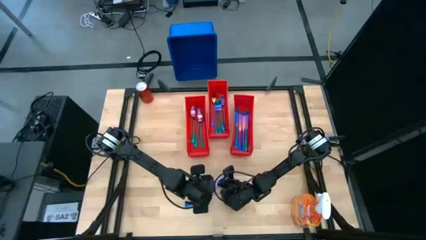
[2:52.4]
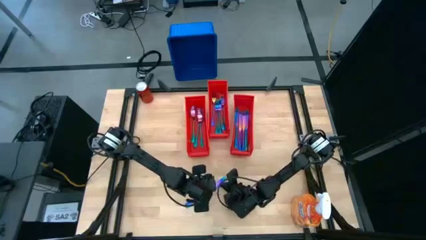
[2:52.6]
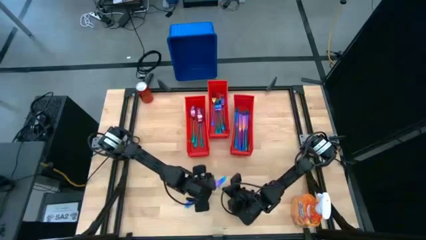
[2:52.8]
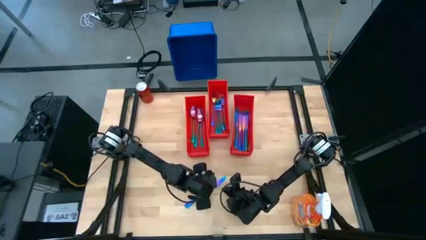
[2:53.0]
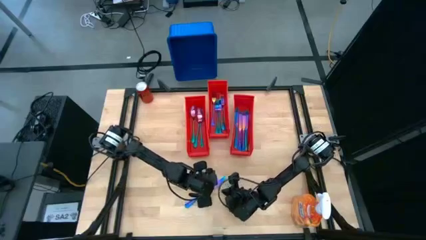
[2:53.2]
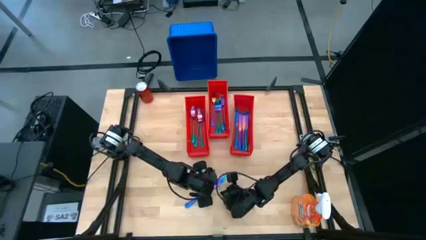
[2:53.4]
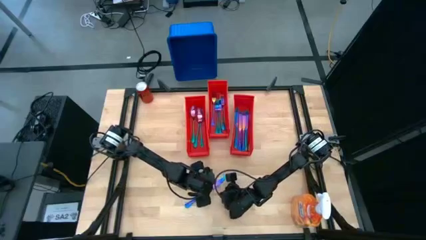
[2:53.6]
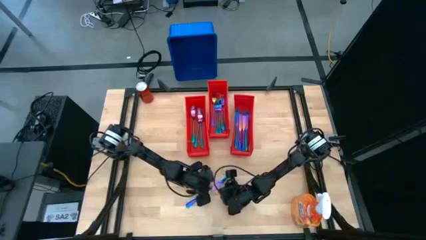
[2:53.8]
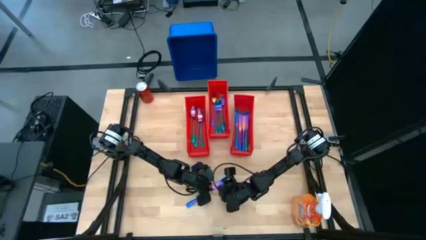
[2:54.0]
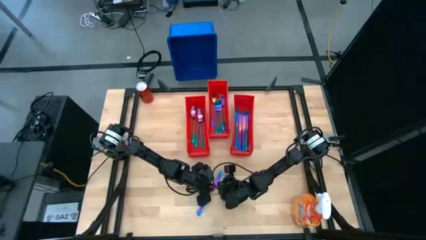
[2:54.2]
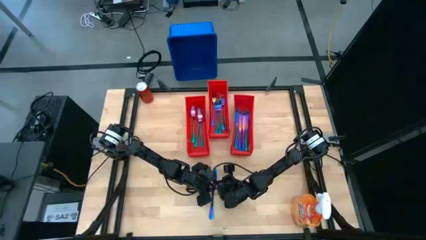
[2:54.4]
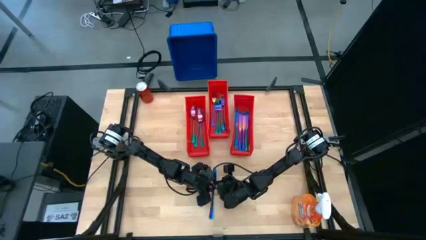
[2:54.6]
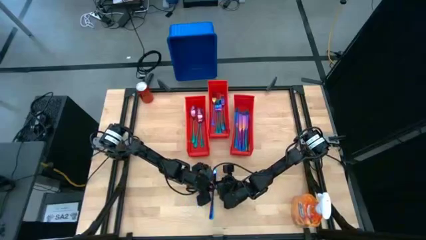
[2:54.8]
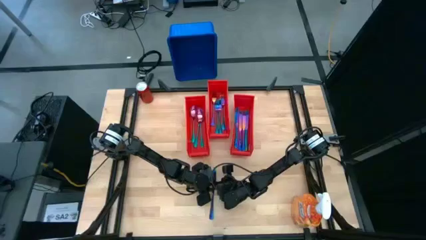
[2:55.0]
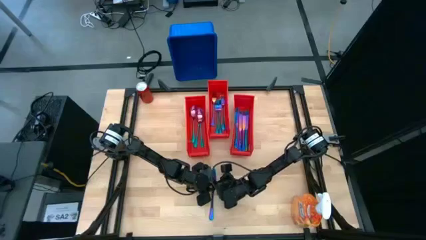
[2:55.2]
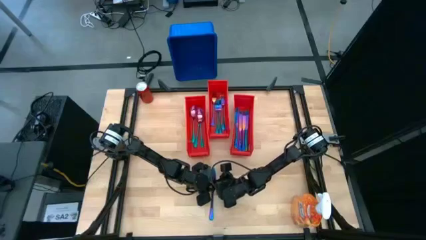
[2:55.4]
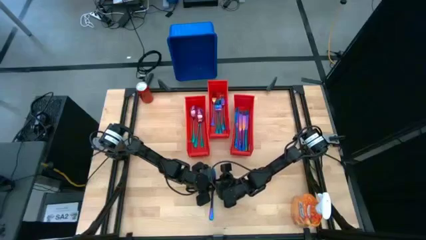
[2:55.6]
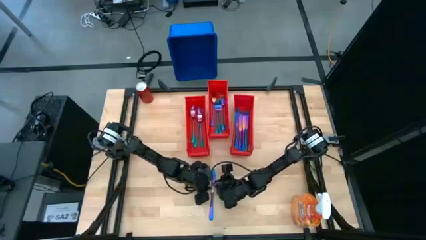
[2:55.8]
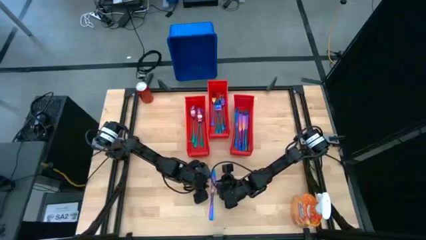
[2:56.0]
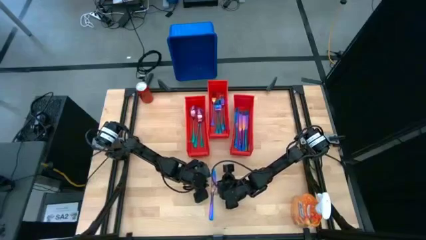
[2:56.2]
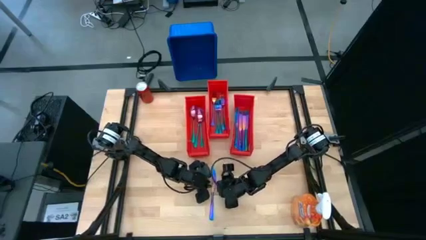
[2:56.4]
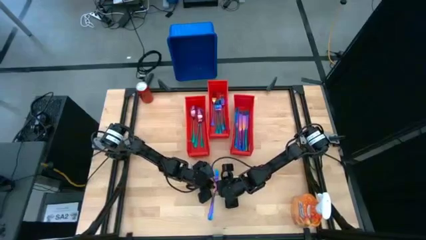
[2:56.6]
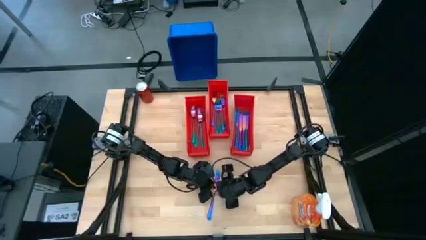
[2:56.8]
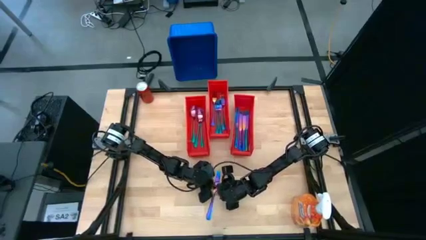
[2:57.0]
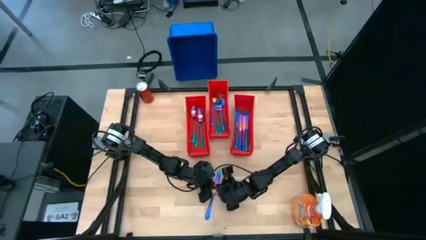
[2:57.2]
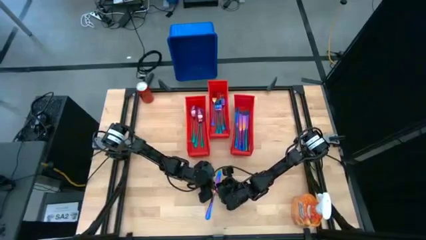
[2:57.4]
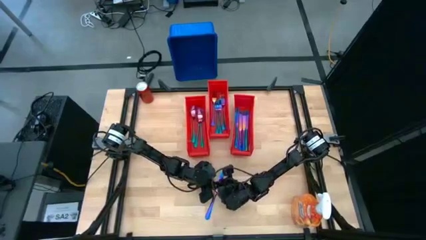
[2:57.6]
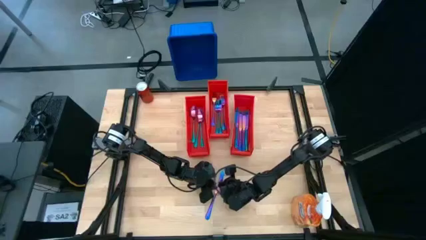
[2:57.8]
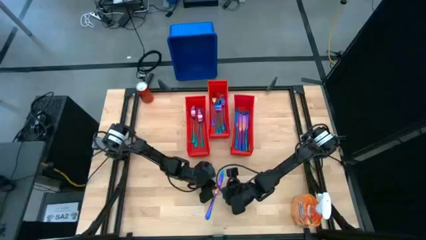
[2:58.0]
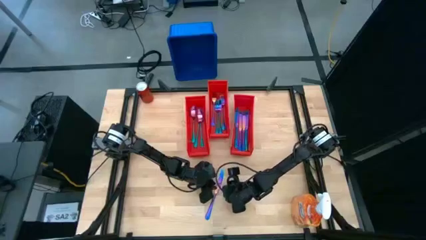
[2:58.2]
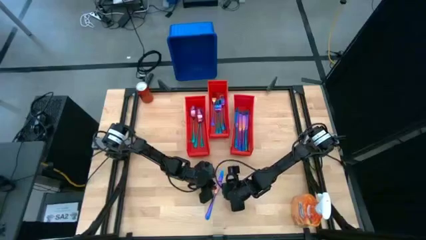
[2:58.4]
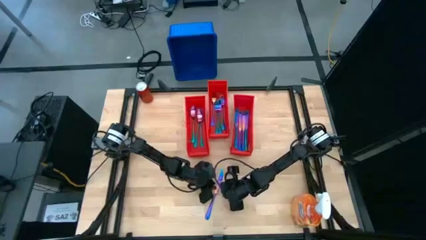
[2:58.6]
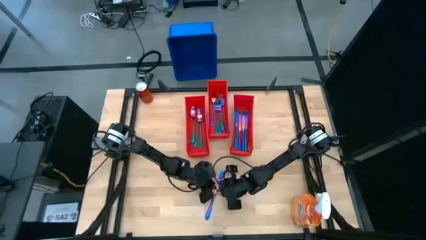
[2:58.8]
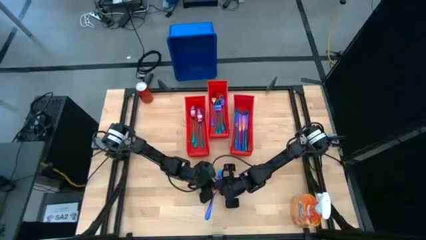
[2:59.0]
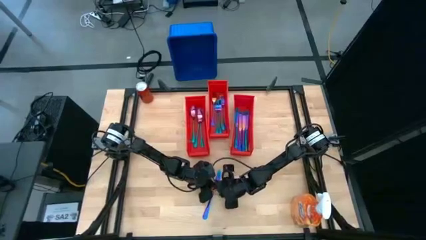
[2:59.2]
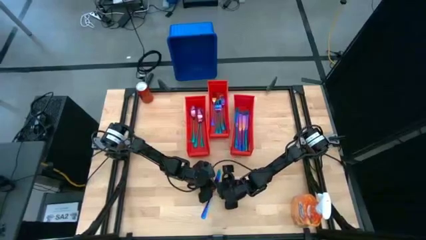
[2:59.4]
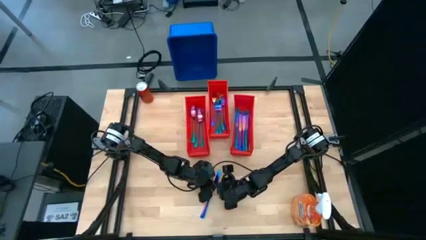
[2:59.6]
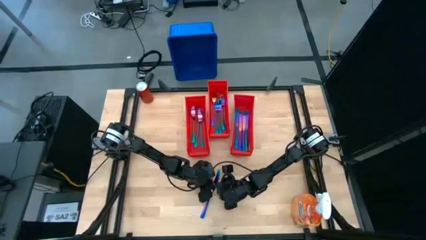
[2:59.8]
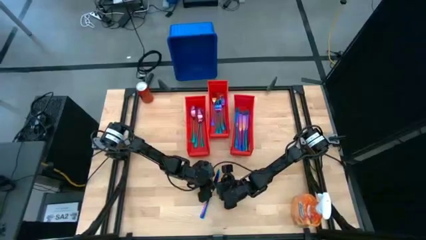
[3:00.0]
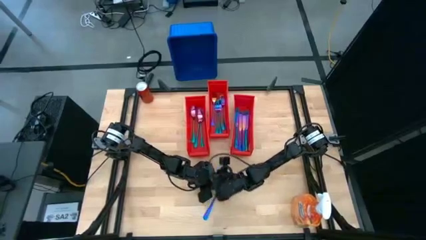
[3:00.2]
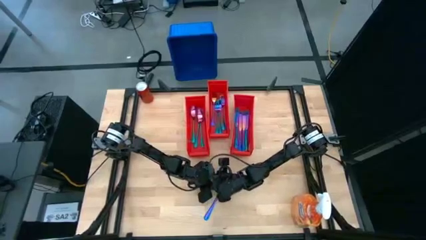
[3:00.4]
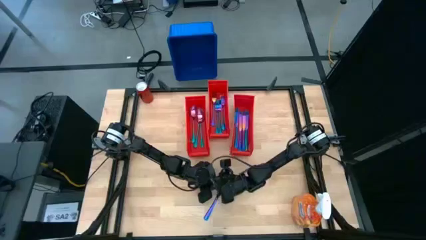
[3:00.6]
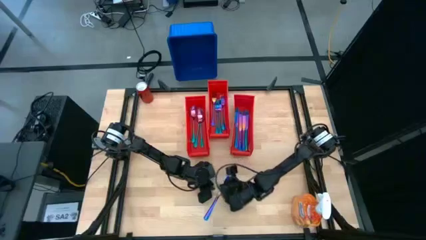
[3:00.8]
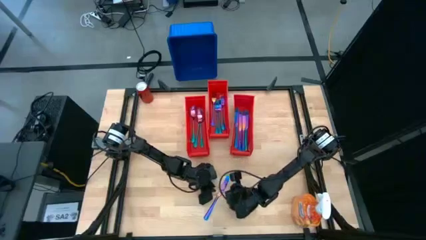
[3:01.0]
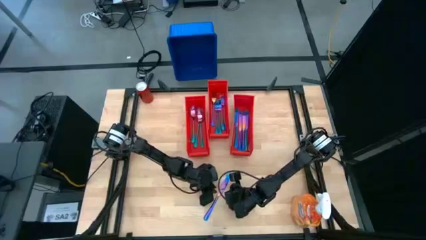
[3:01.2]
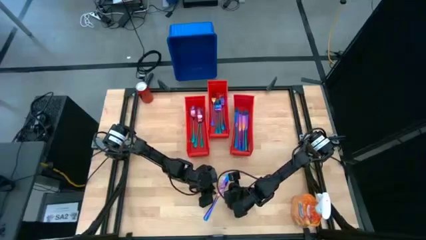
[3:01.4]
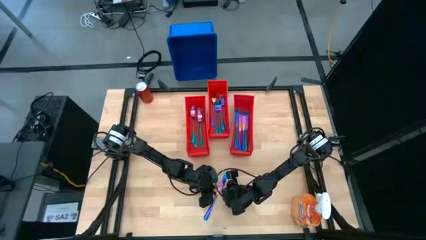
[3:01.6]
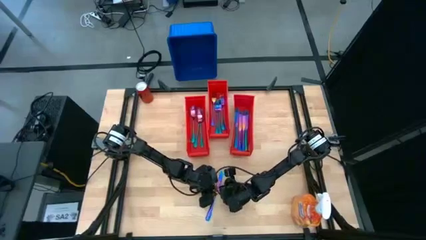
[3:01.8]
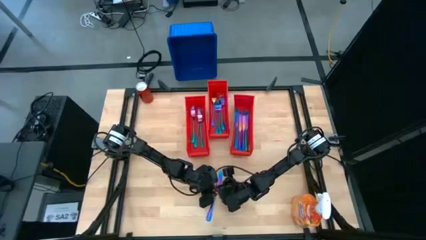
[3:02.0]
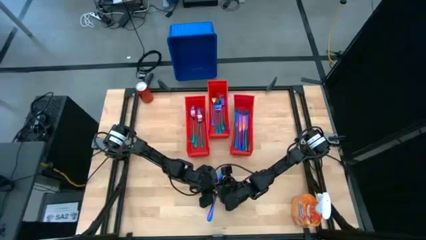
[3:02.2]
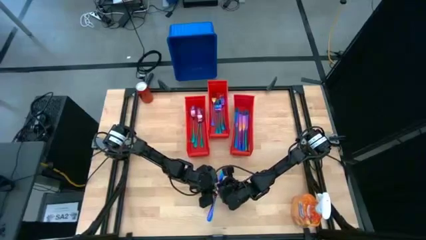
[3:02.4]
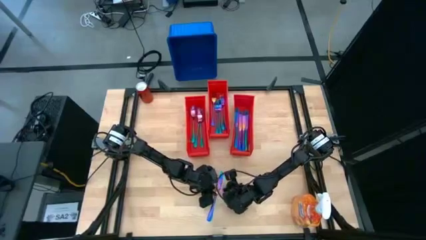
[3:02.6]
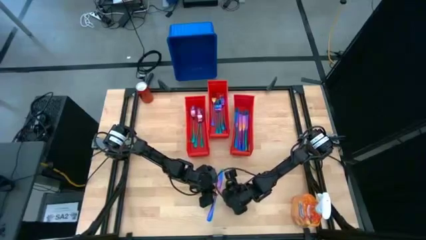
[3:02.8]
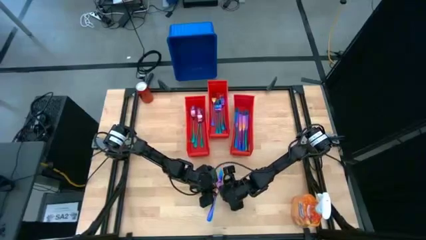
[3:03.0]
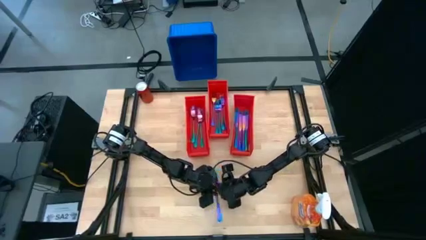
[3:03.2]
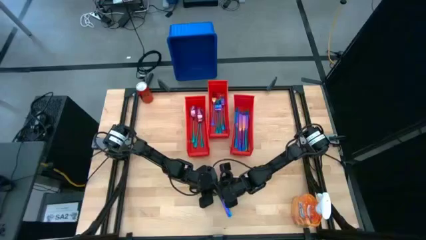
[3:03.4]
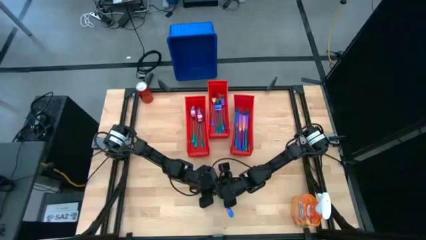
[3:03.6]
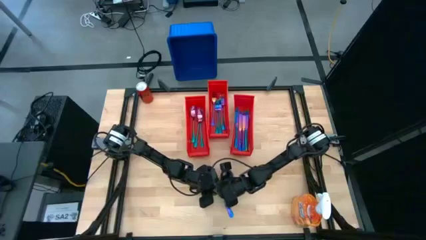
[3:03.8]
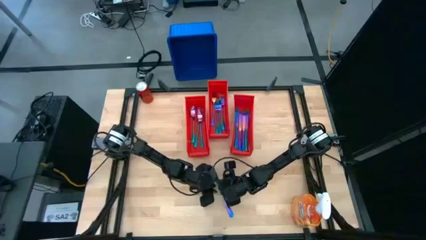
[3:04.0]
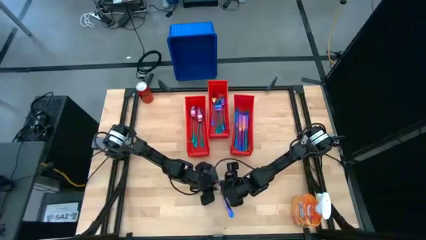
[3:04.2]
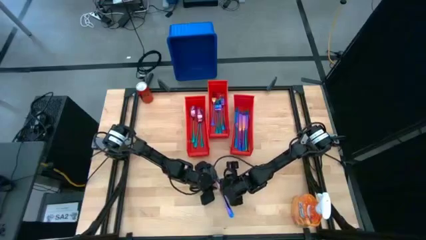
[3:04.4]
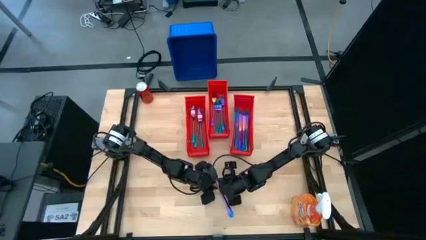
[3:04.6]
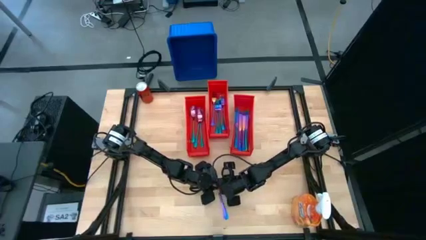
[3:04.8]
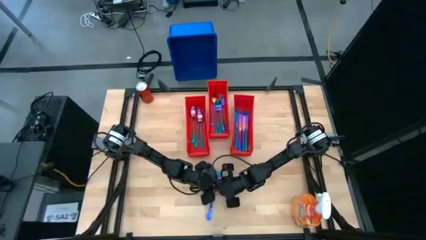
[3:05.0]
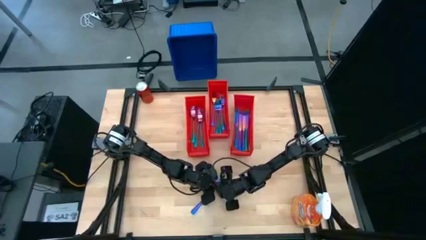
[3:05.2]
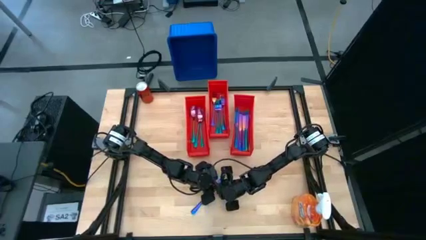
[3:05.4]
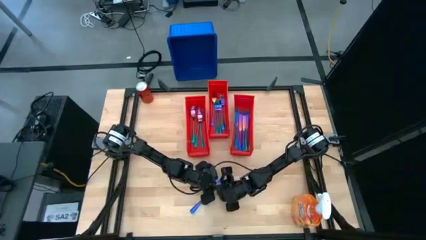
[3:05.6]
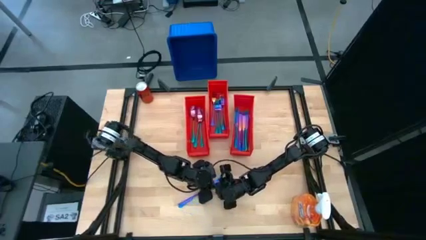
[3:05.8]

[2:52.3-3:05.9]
Task: Sort silverware
Put the iridescent knife into the right orange bin
